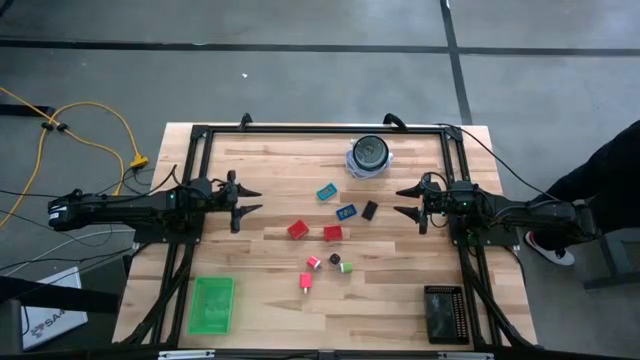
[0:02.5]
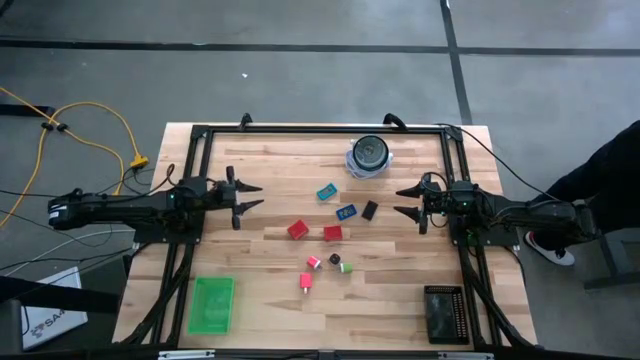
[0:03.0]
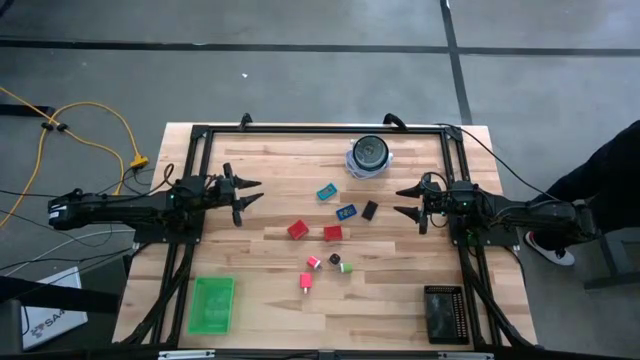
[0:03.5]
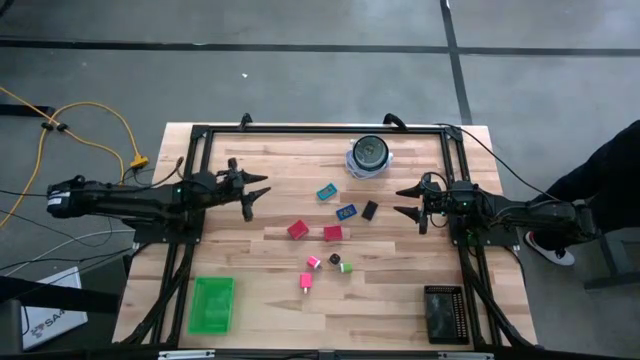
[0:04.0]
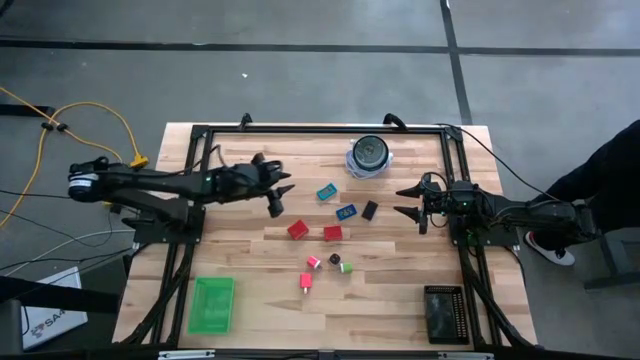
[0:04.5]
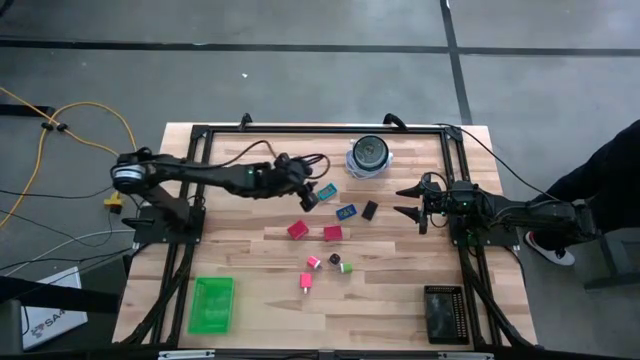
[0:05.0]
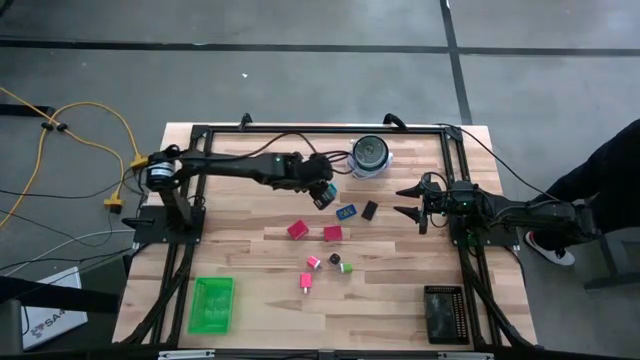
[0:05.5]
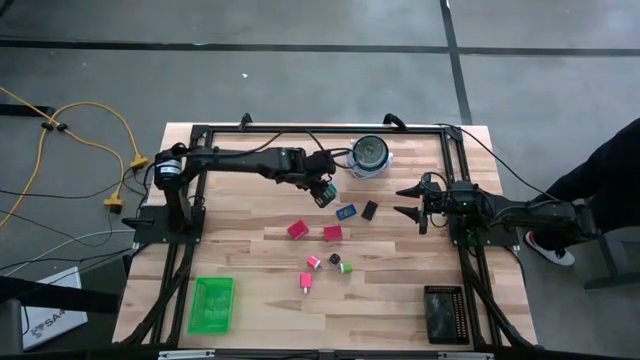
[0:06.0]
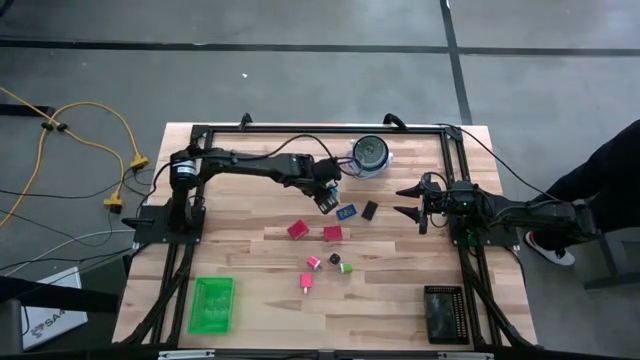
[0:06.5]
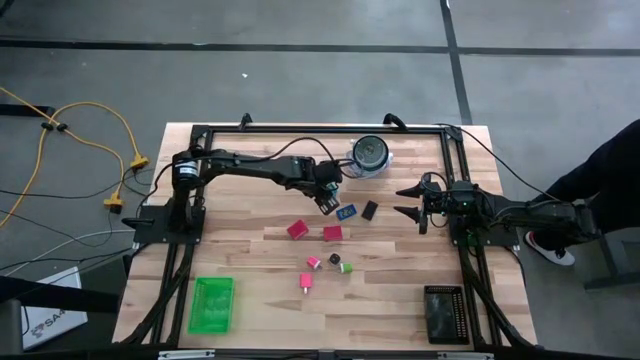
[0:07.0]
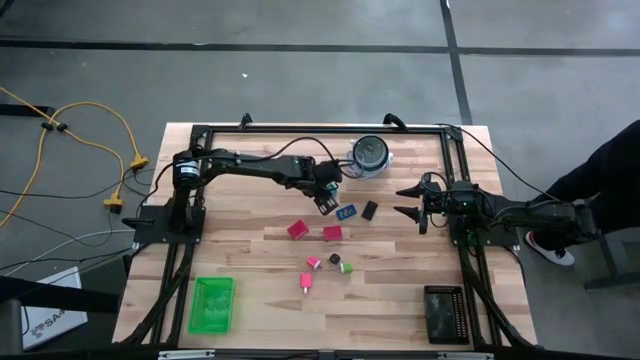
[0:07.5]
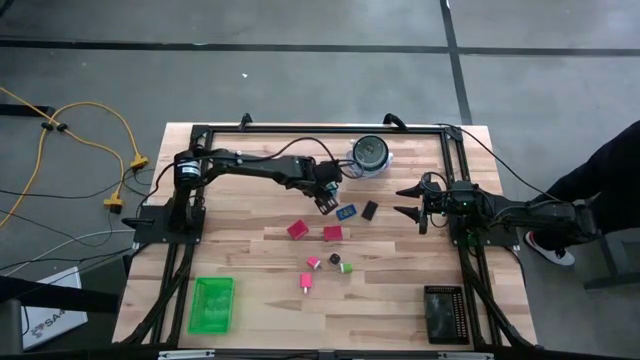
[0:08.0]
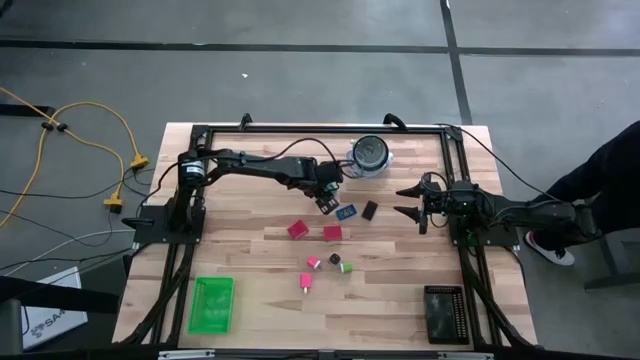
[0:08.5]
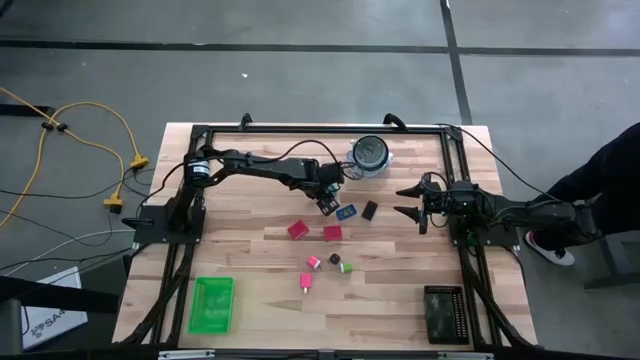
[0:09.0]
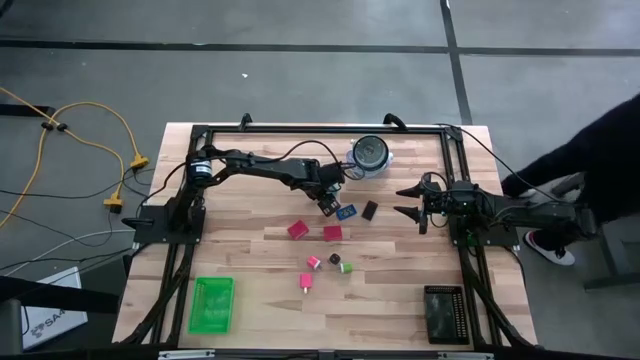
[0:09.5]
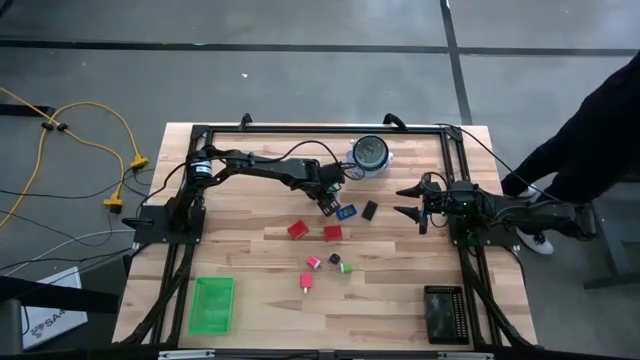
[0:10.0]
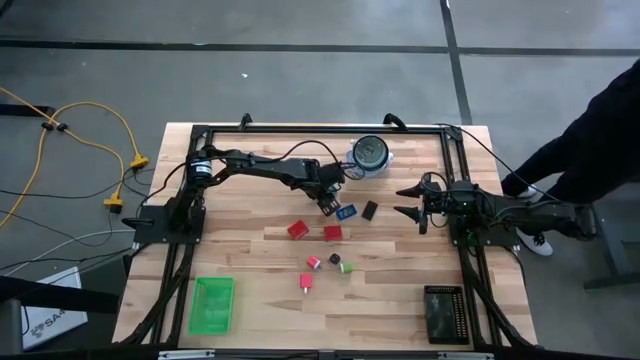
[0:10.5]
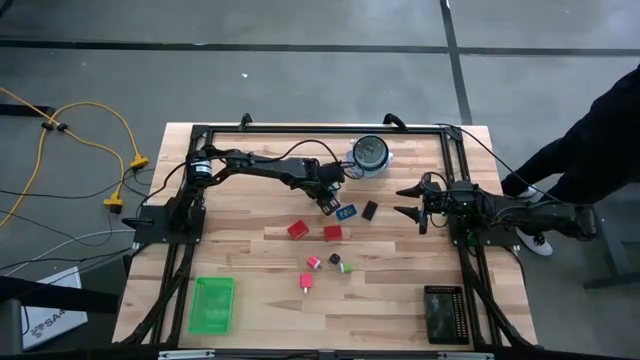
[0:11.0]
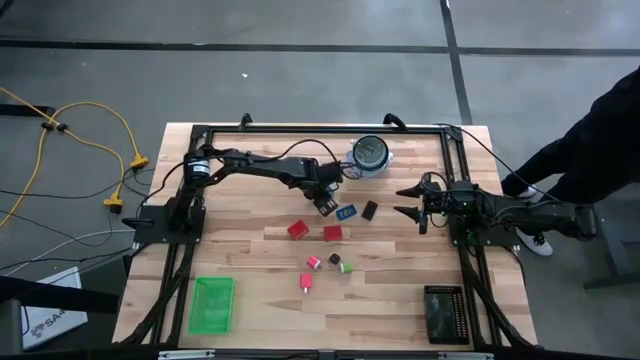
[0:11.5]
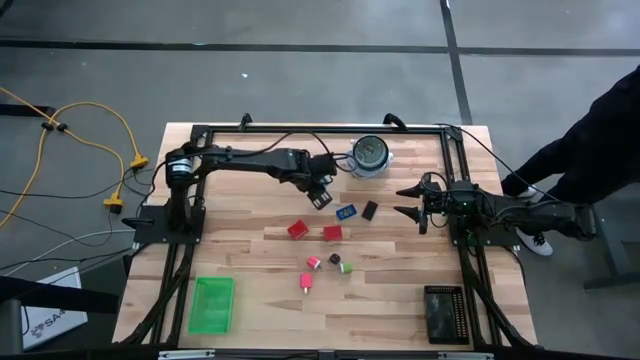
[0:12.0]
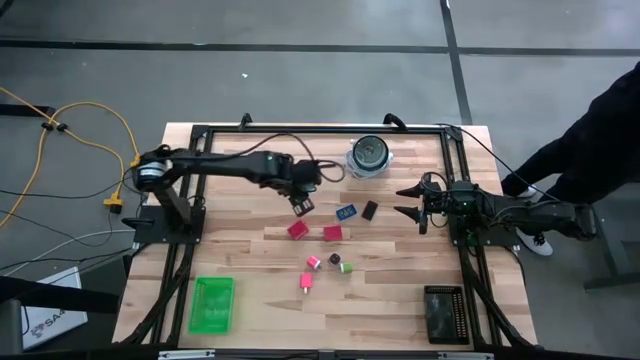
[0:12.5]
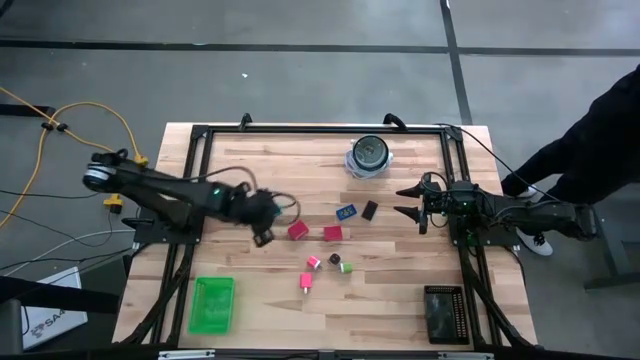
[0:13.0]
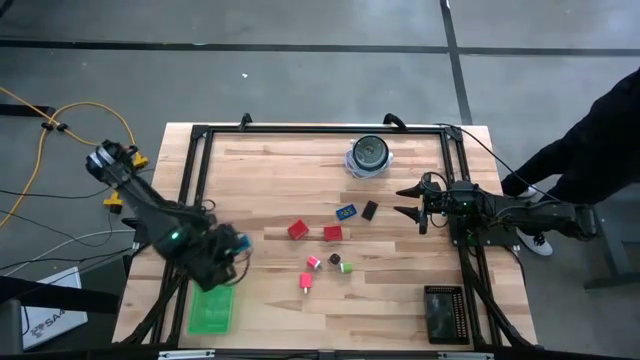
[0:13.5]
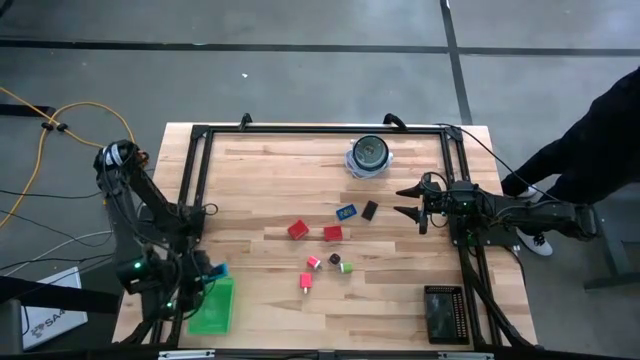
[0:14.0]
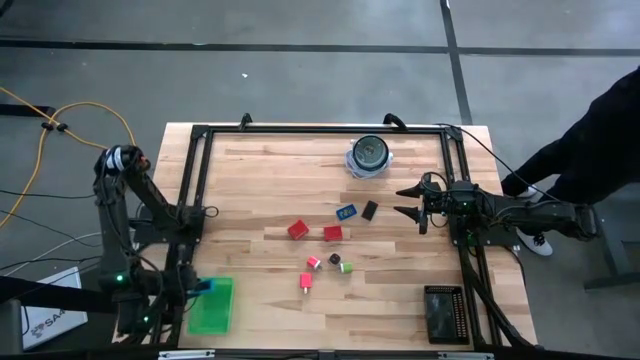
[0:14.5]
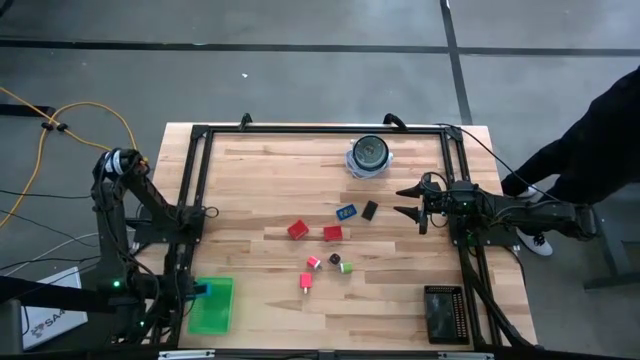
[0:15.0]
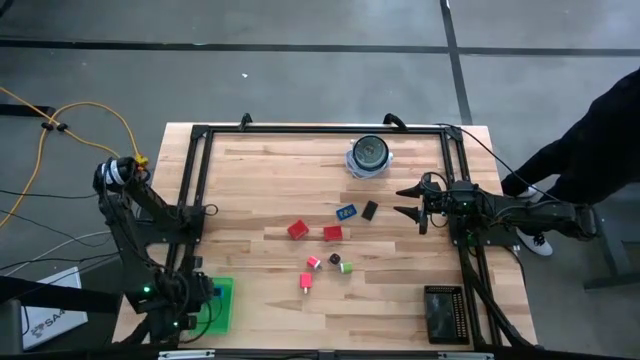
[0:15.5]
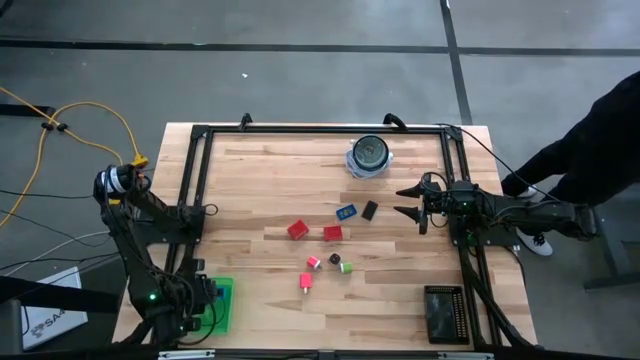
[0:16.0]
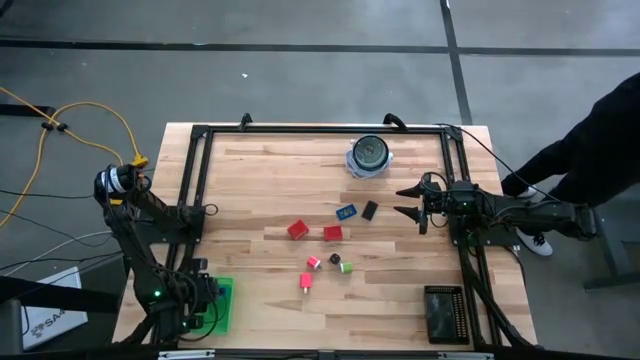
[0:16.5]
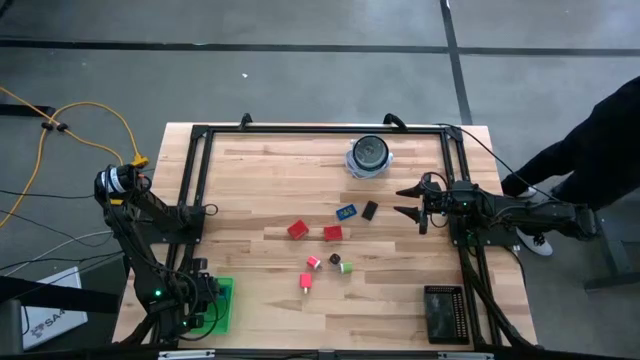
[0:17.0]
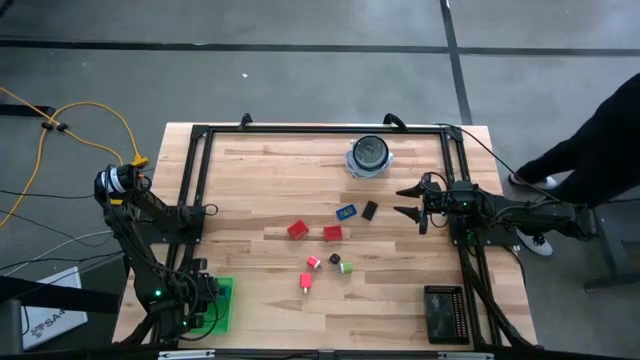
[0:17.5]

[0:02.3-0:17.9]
Task: Pick & Place Office items
Put the light blue digital timer into the green bin
